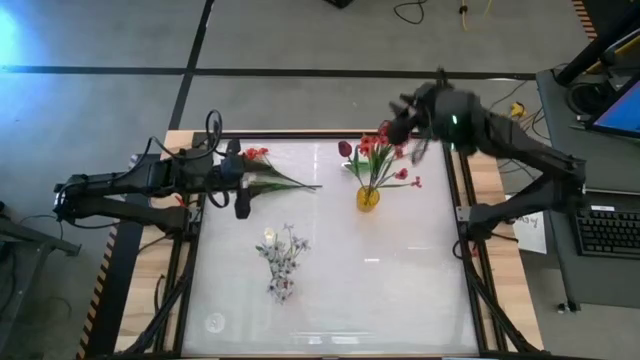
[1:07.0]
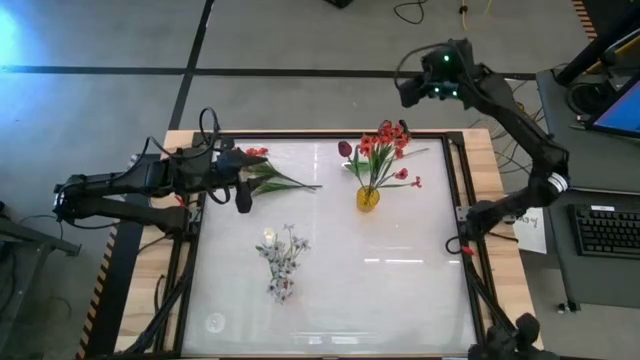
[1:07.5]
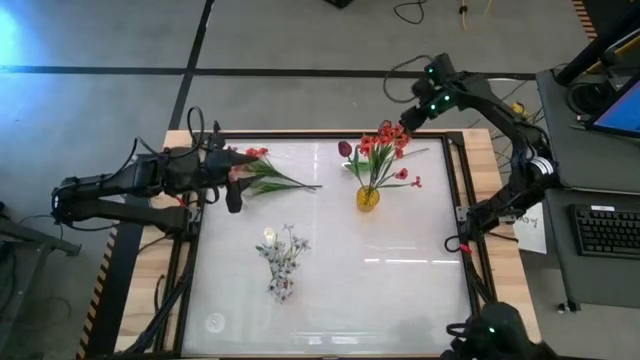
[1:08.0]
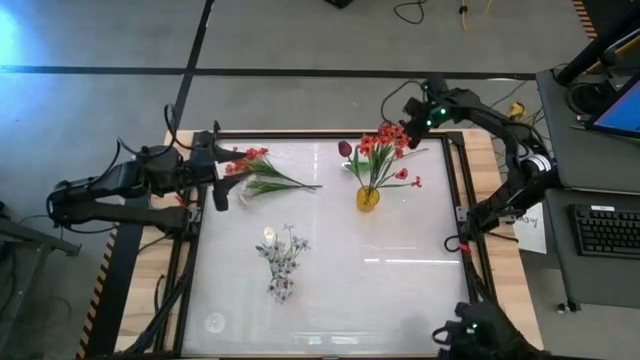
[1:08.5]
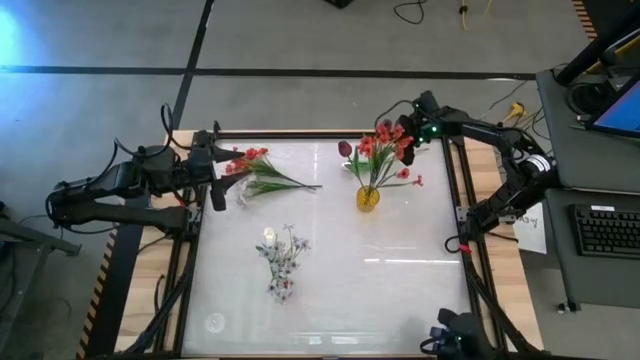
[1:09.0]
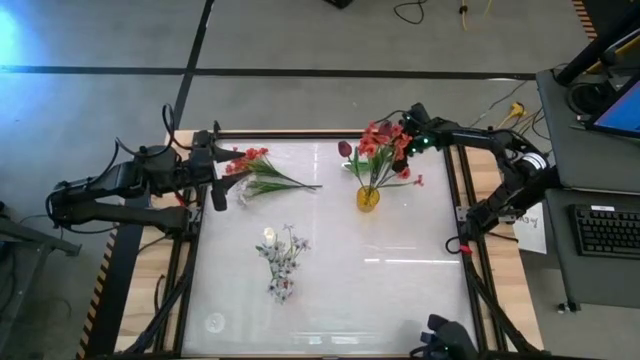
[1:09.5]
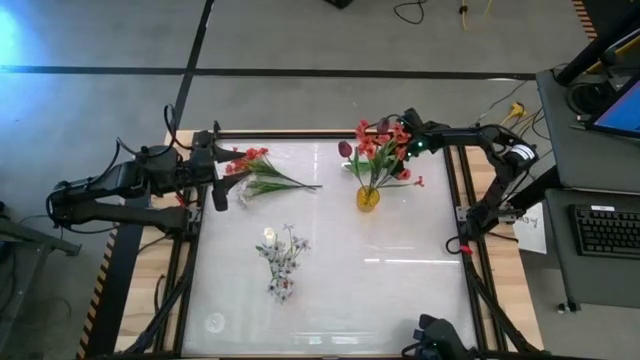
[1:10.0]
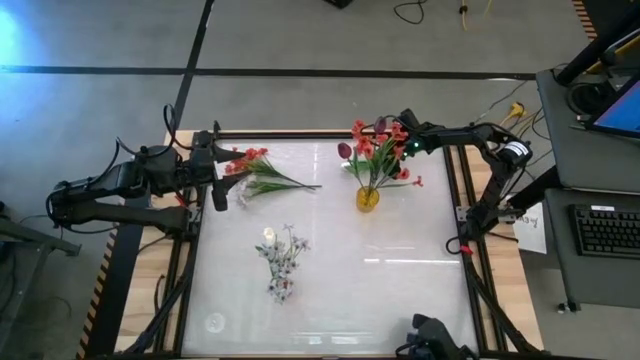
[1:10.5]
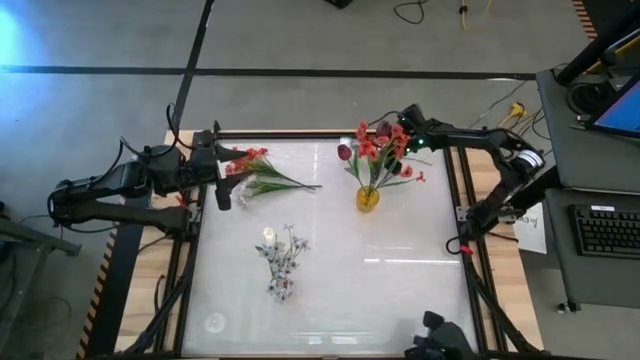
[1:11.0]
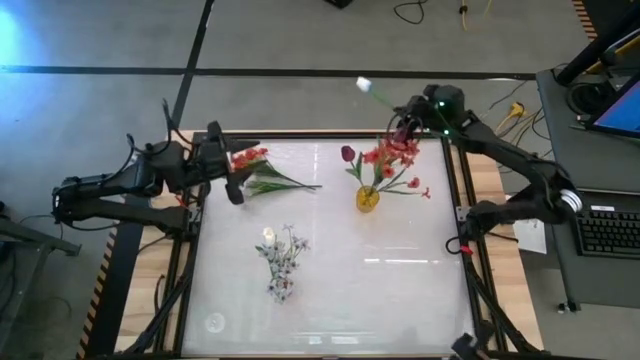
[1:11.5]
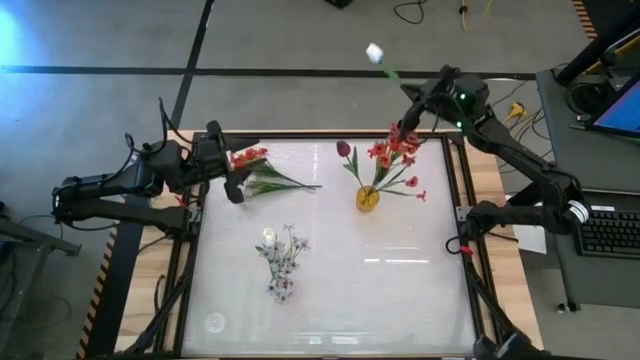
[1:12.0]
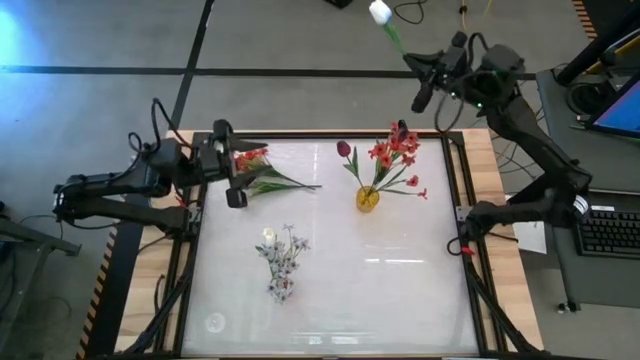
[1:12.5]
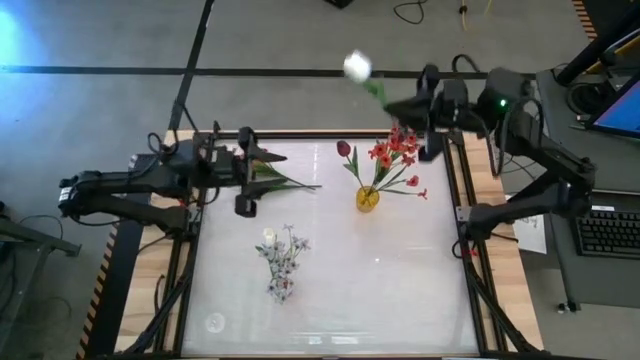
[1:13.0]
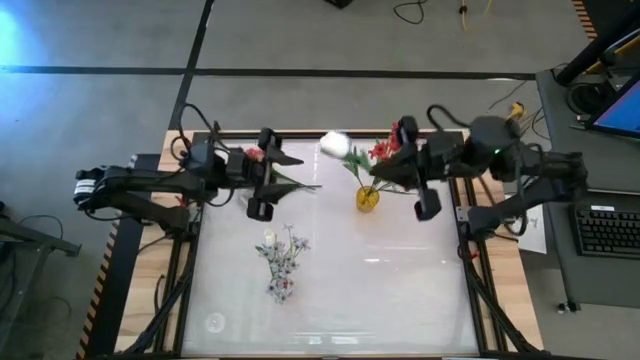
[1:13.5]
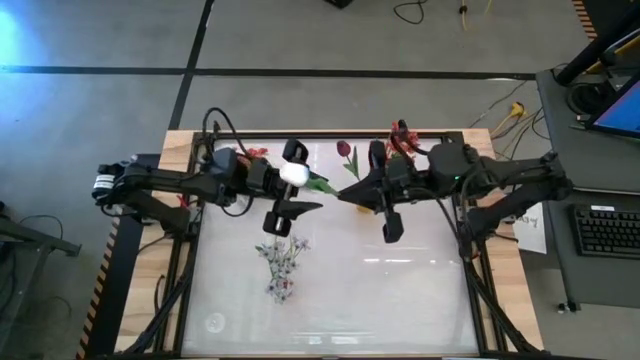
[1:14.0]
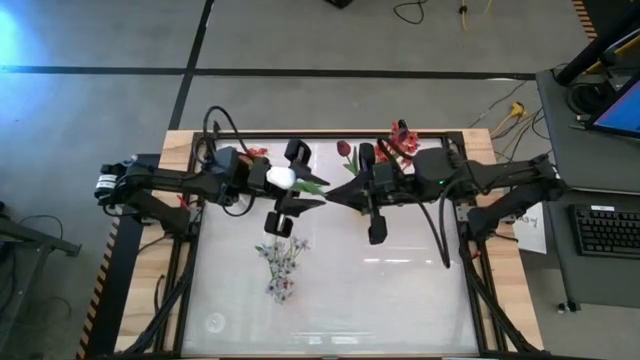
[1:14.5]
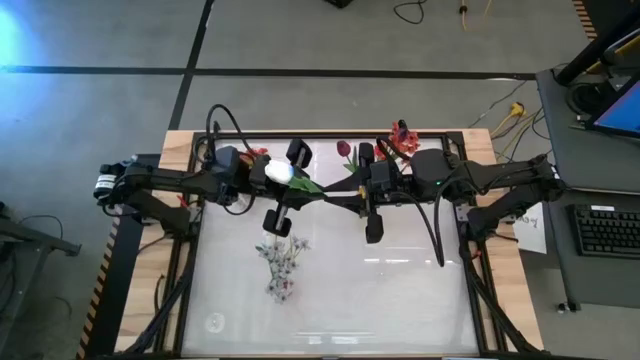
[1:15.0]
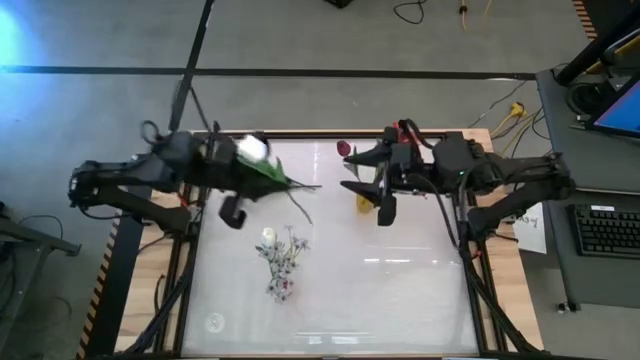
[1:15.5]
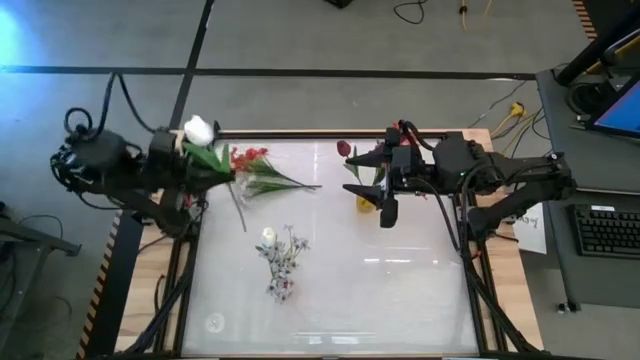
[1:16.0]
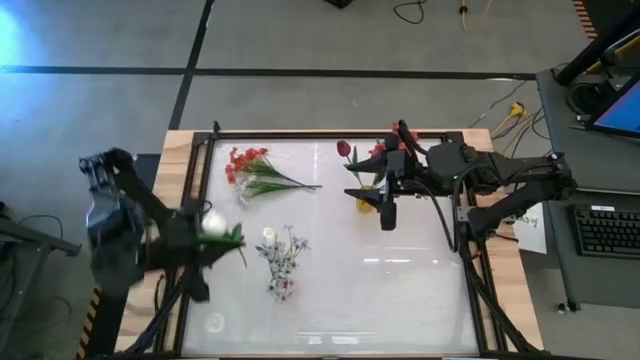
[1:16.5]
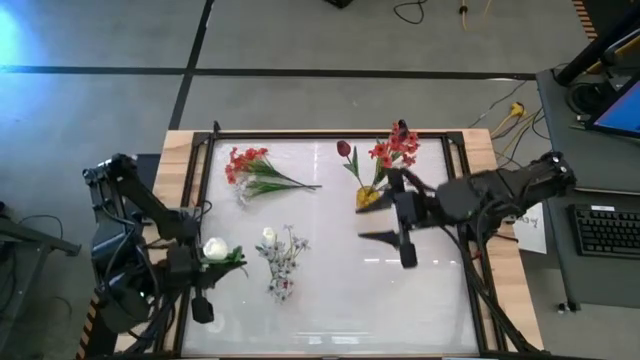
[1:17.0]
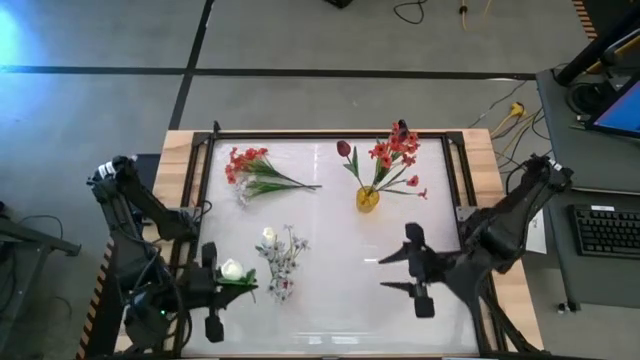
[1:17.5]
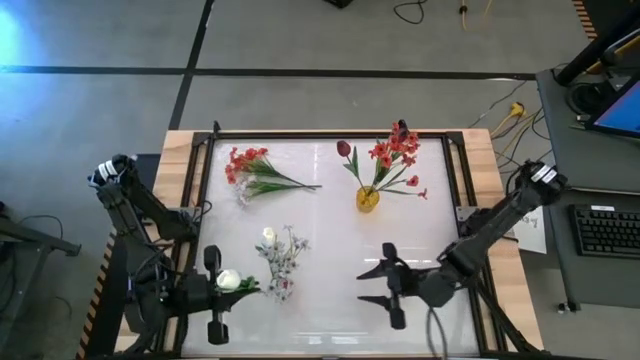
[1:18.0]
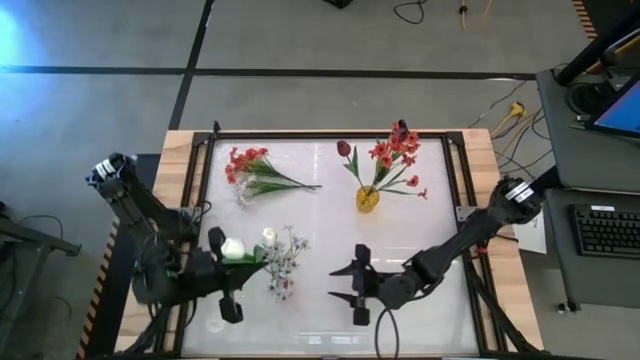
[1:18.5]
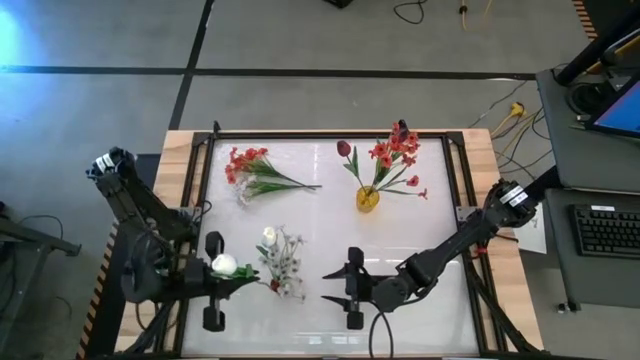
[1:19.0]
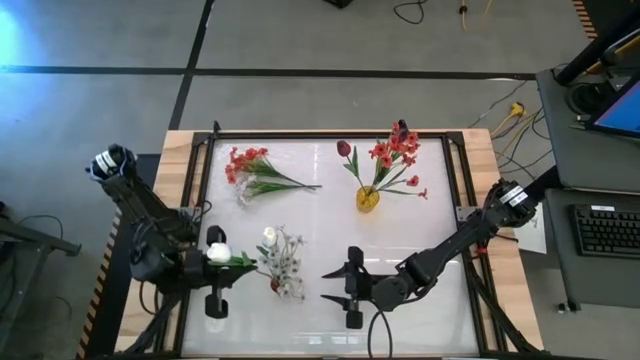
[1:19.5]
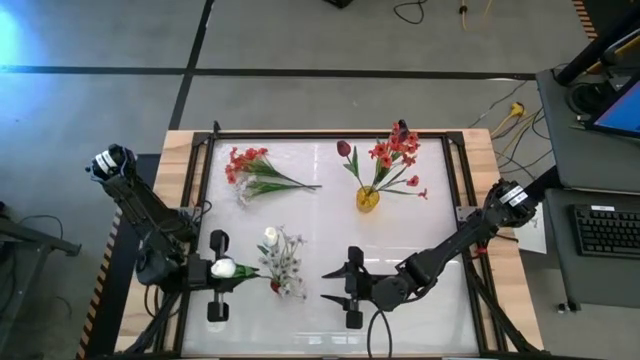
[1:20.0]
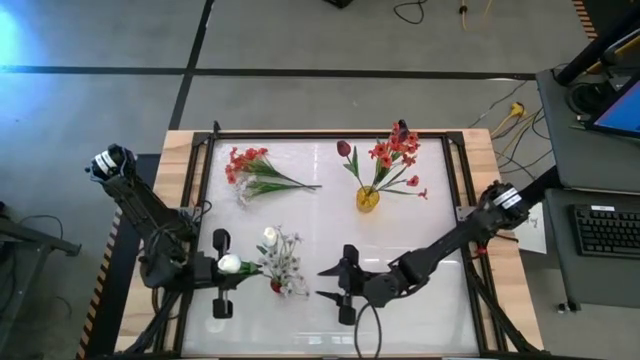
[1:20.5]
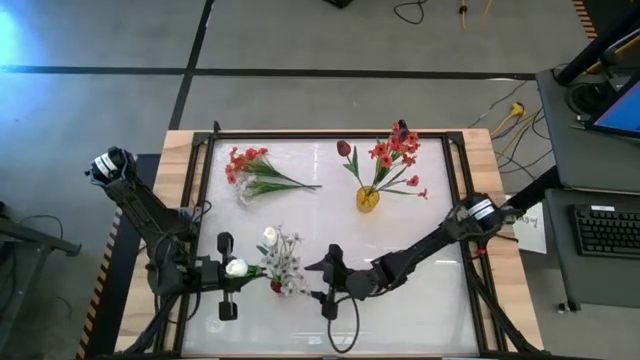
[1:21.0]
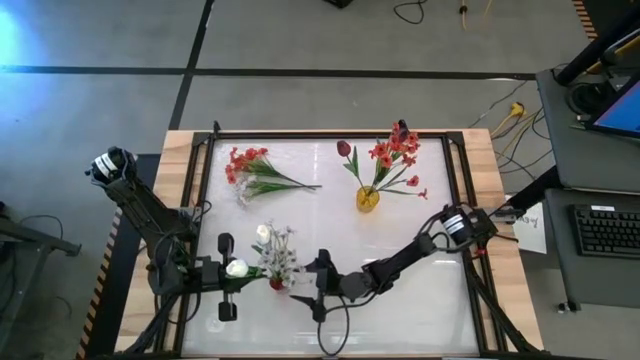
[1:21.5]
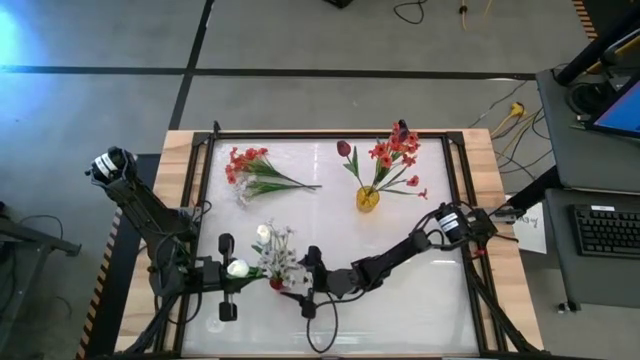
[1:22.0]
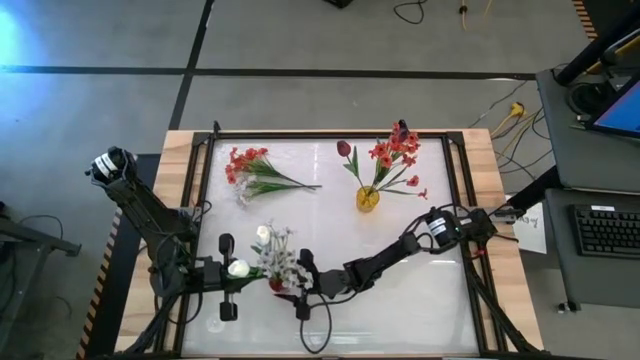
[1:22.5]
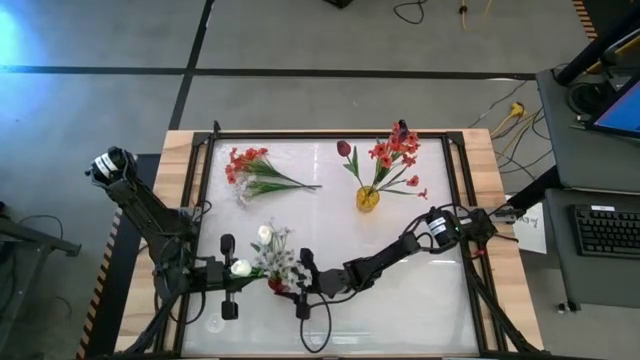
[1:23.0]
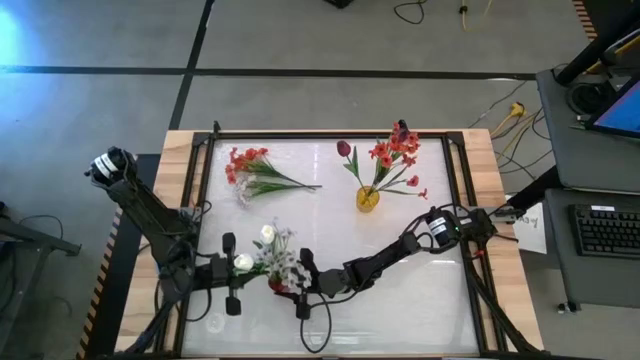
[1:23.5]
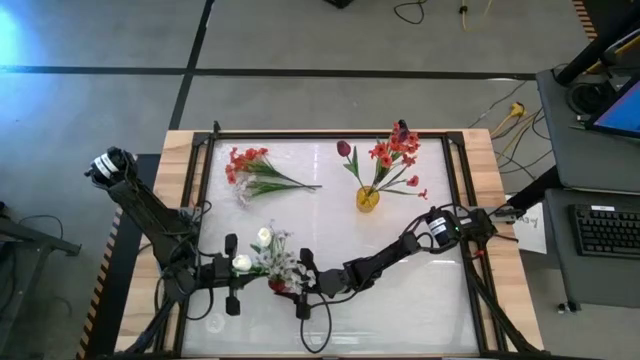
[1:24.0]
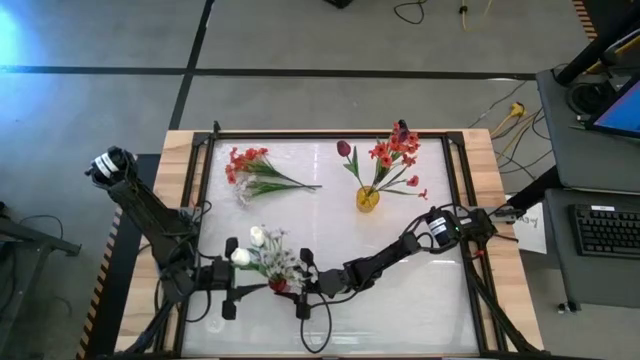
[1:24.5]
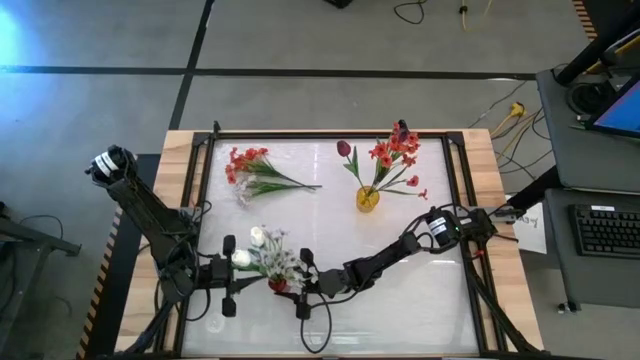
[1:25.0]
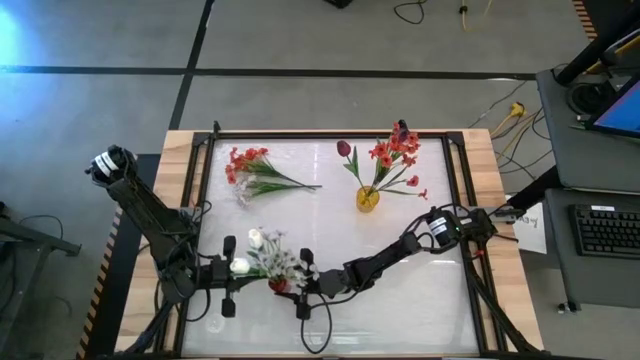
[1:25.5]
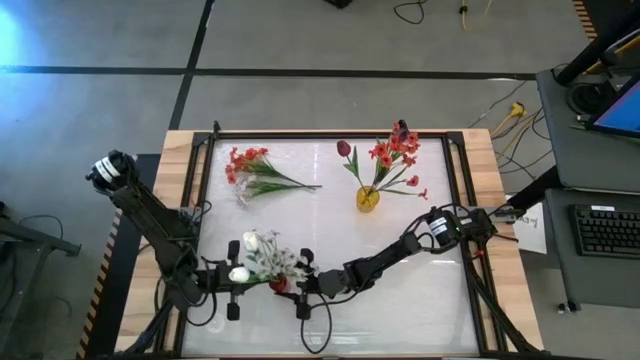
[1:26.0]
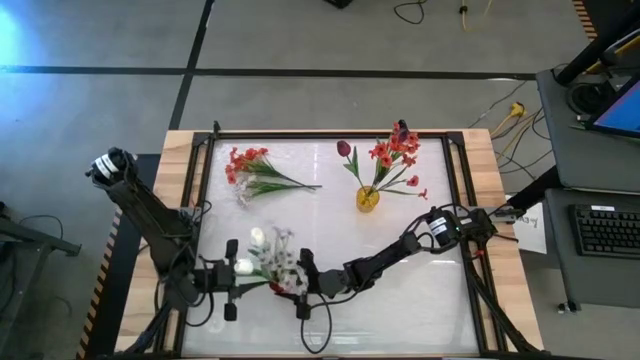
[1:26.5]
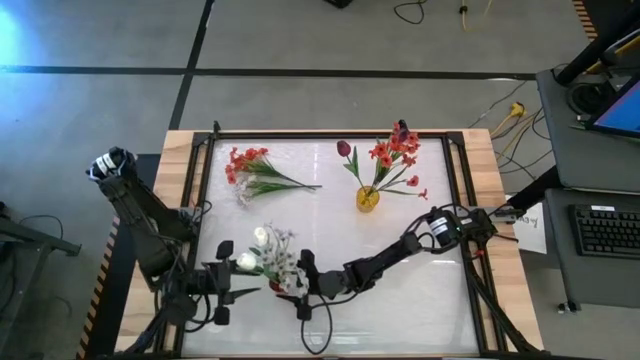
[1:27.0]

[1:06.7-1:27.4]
Task: Sort flowers into vase by color
Put the white flower into the red vase

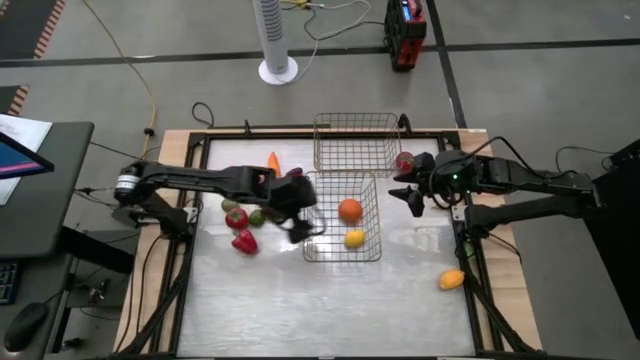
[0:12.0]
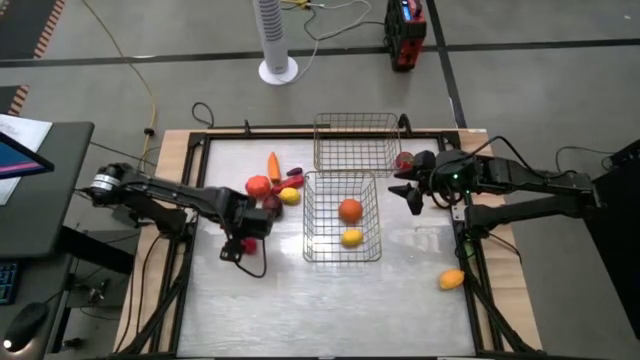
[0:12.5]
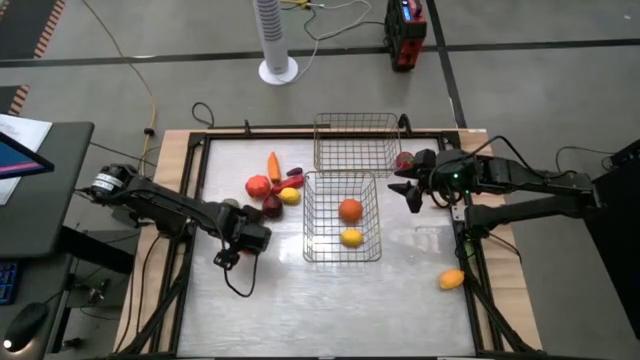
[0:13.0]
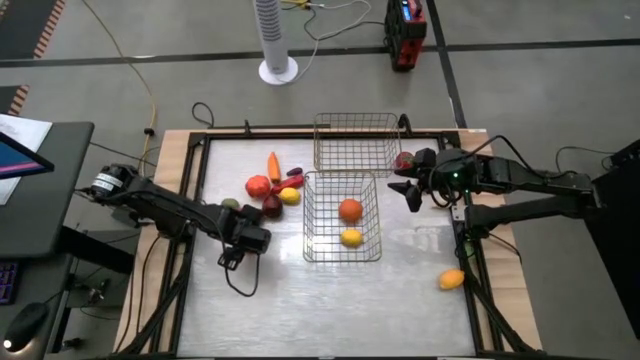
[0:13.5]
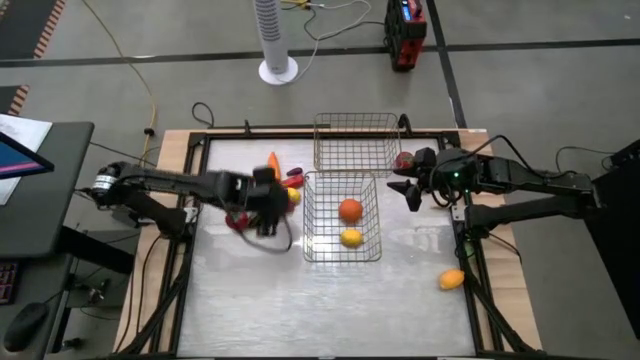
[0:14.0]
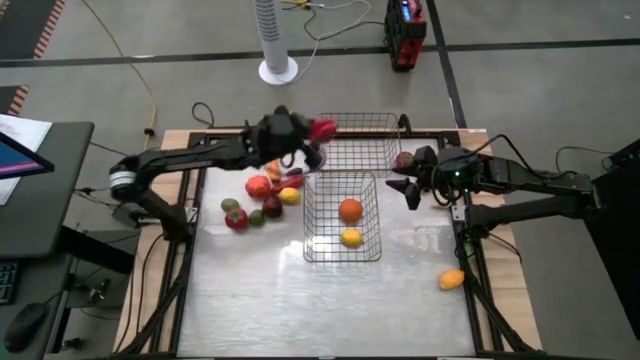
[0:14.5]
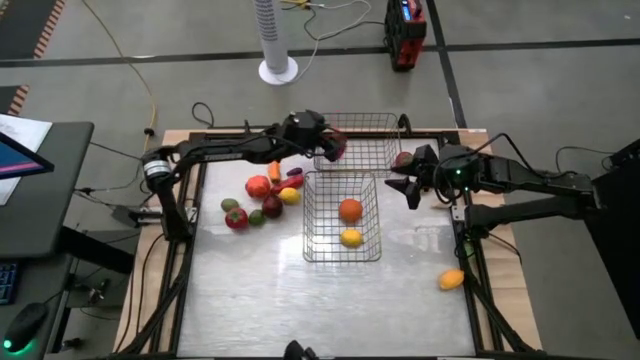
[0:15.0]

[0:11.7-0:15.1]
Task: Sort produce into baskets
Put the red bell pepper into the top wire basket
